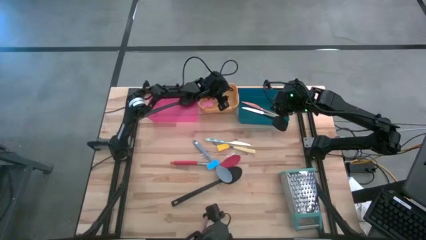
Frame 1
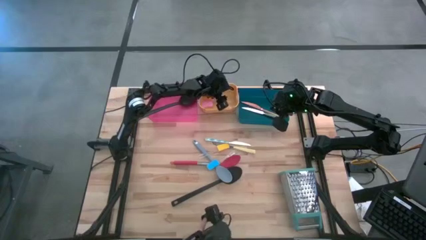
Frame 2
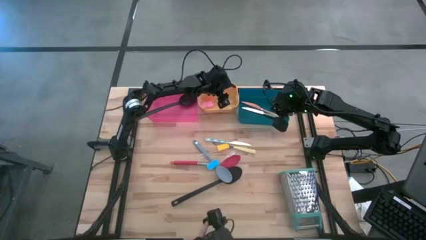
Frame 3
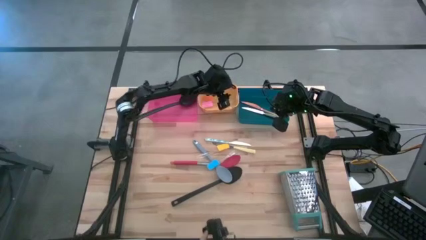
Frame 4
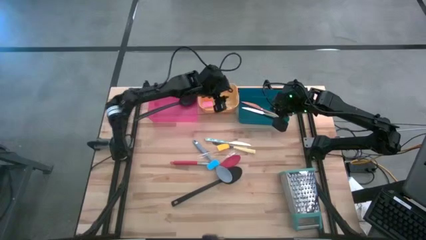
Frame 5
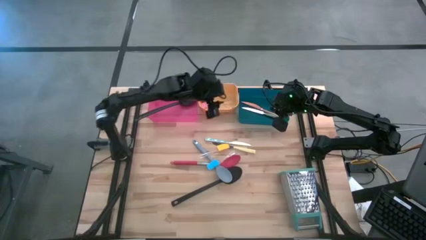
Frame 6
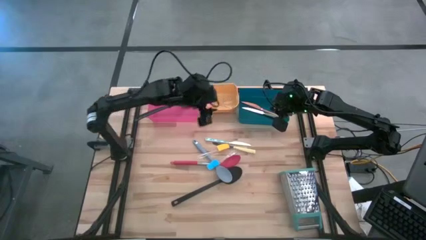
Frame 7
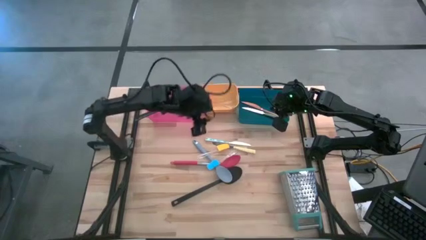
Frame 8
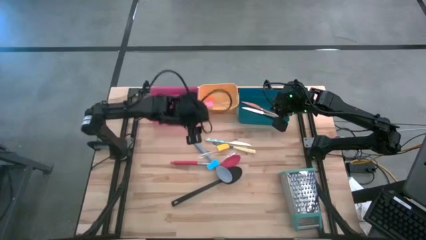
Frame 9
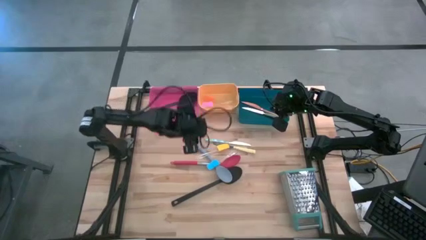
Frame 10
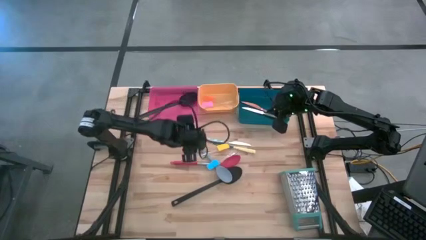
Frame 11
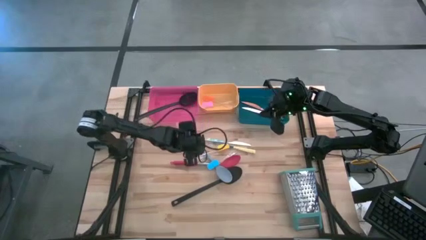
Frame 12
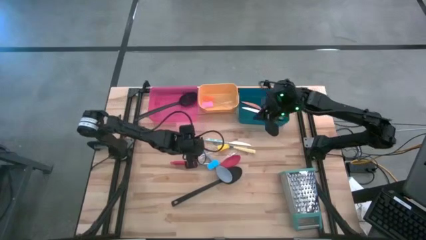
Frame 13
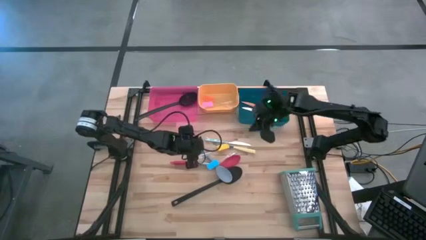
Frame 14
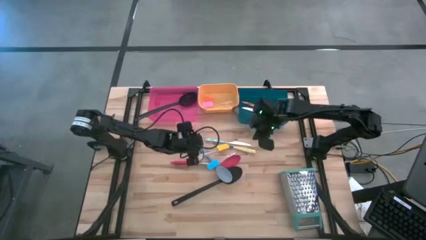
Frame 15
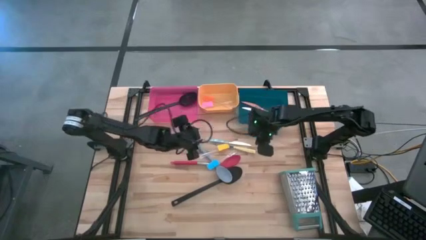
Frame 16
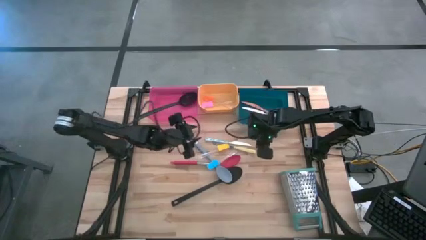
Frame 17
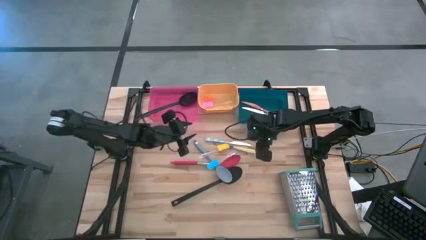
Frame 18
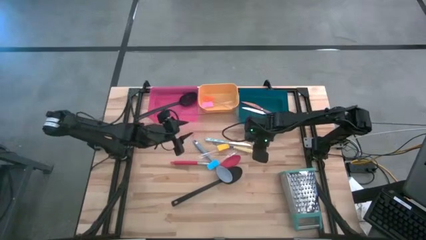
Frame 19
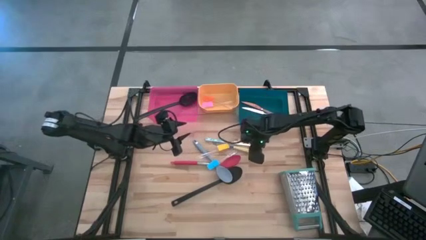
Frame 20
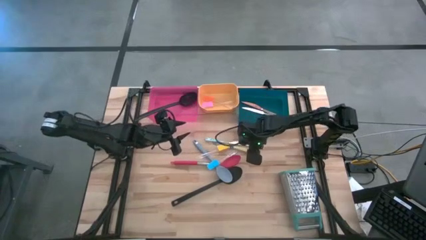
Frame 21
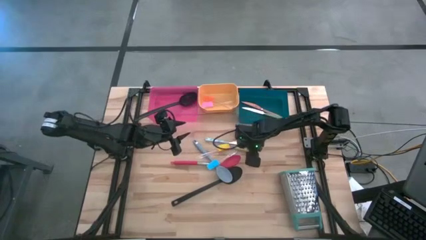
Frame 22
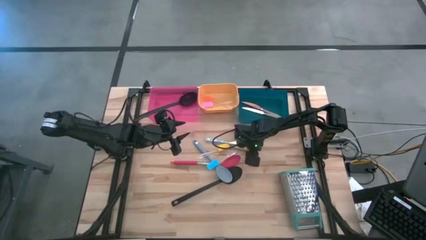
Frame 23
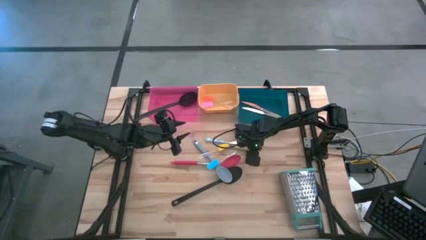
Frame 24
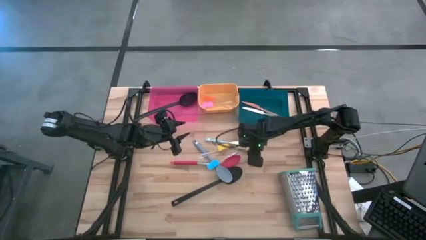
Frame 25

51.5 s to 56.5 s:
Task: Pick & Place Kitchen Items
Put the white knife into the blue bin

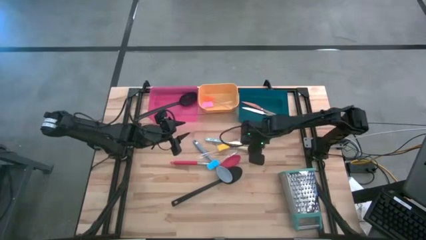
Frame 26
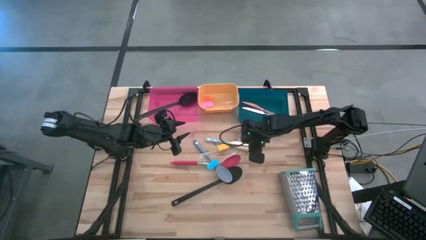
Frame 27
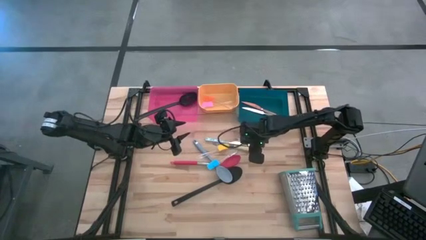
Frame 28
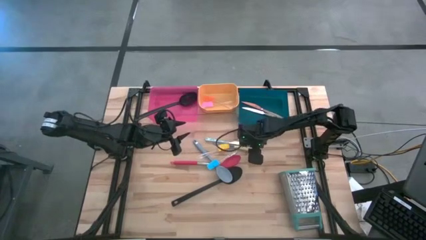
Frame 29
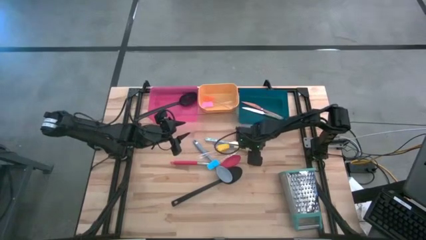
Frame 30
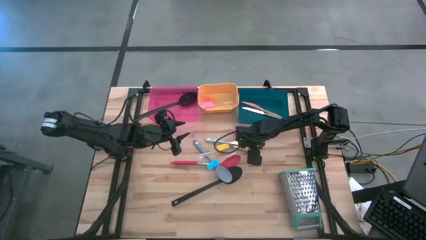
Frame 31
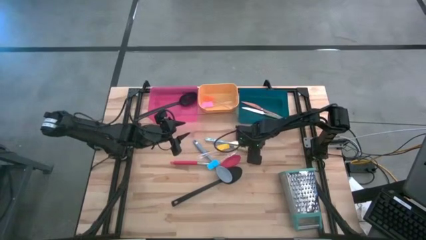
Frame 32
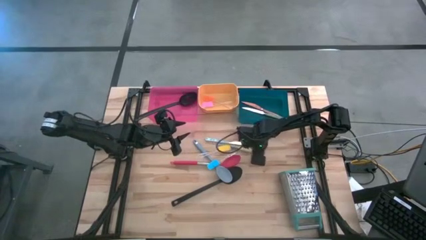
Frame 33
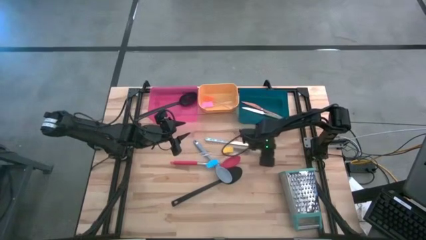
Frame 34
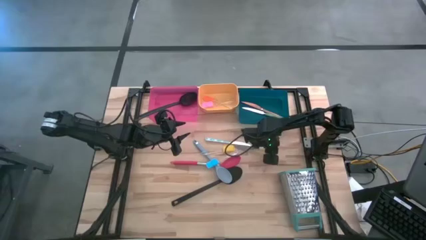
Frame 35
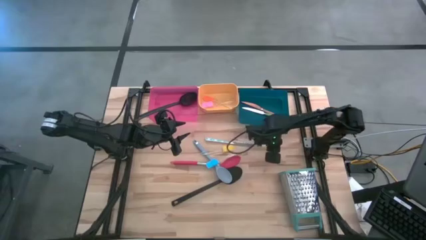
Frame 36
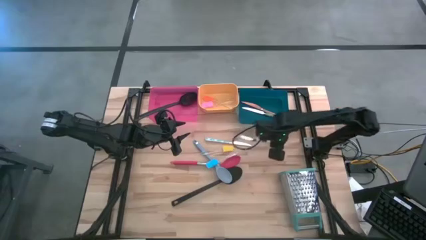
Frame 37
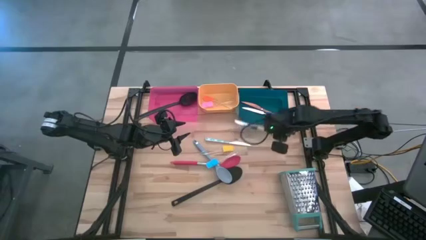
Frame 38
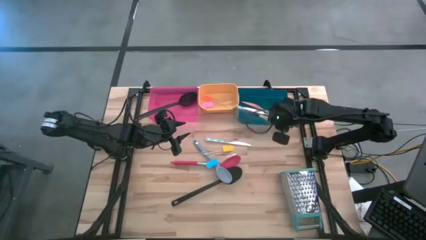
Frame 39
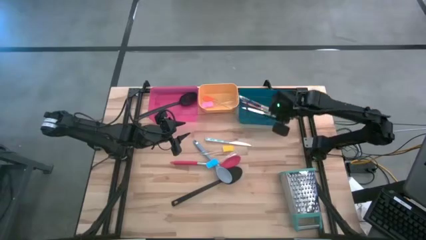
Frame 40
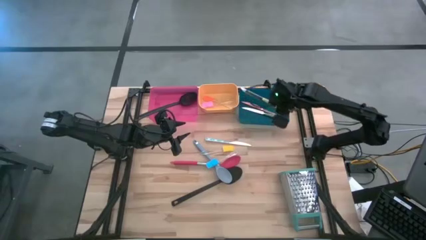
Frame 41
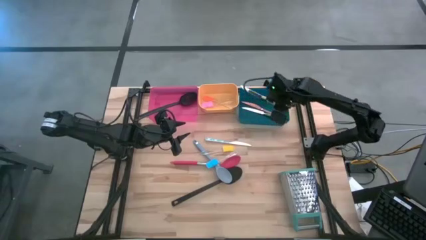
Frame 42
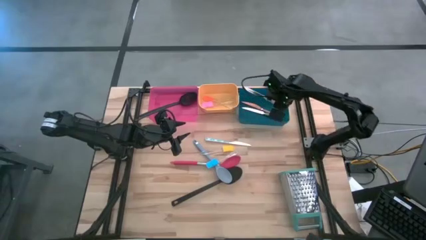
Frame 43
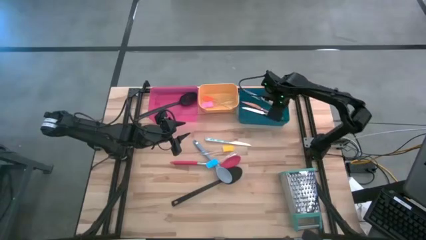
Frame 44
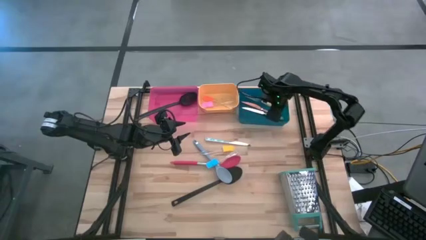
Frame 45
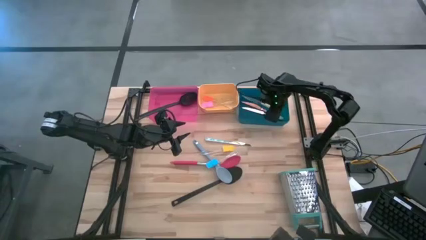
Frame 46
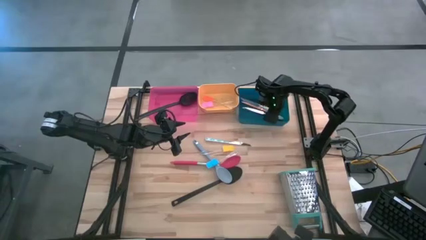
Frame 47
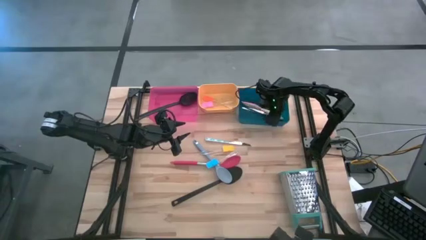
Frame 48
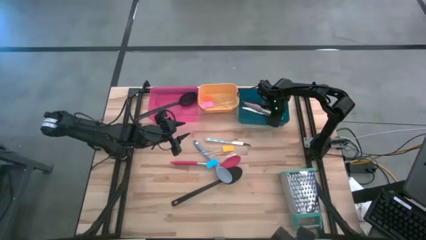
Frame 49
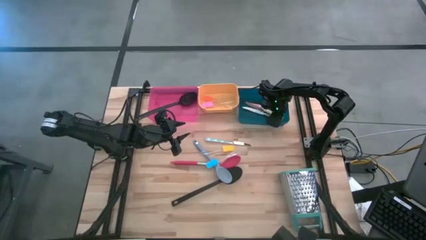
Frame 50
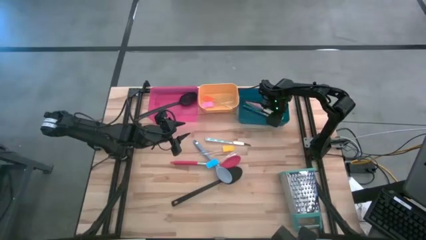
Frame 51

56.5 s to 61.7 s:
Put the yellow knife into the blue bin

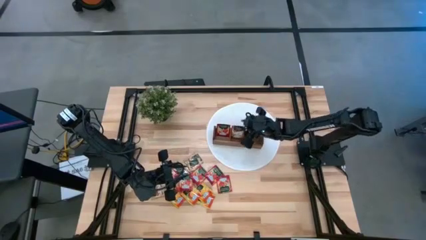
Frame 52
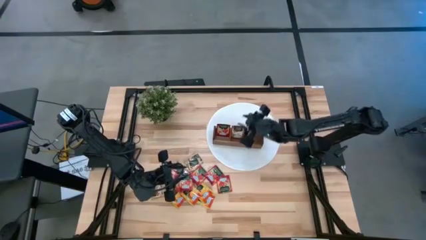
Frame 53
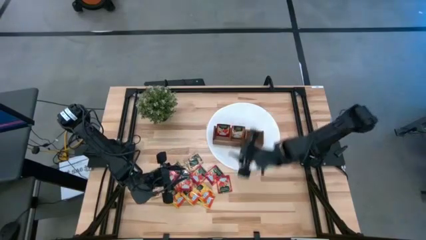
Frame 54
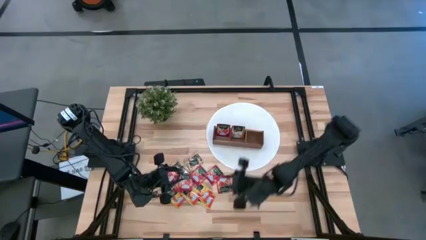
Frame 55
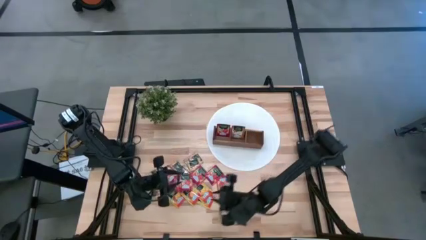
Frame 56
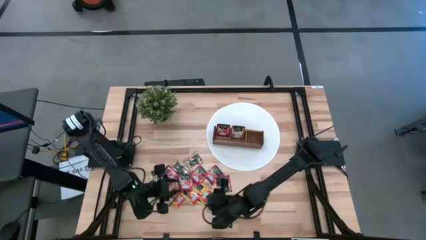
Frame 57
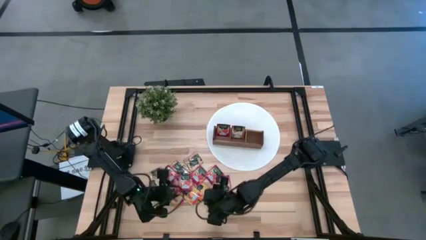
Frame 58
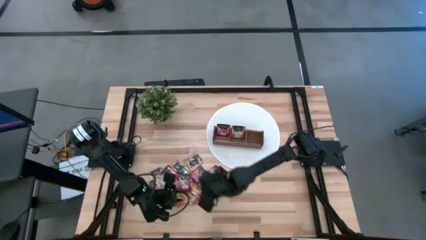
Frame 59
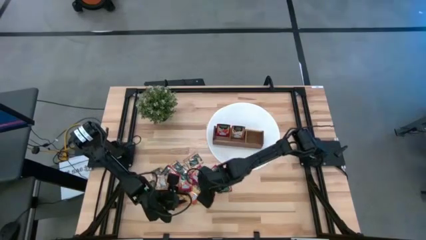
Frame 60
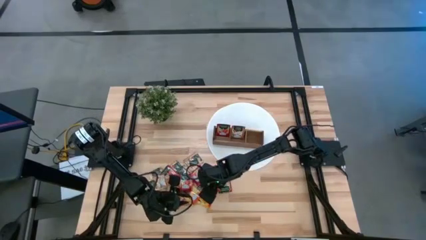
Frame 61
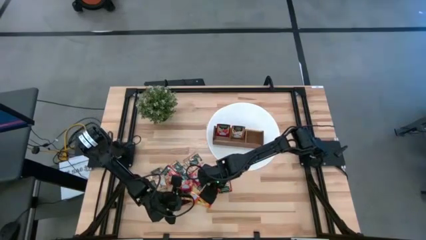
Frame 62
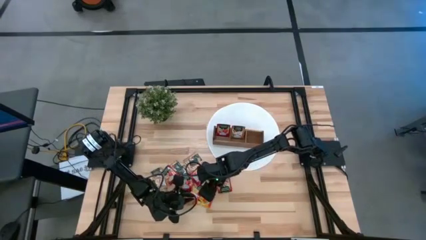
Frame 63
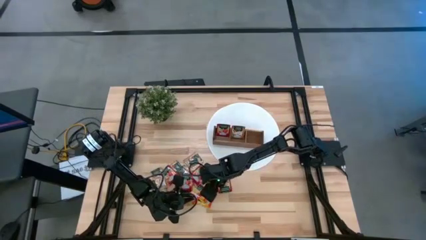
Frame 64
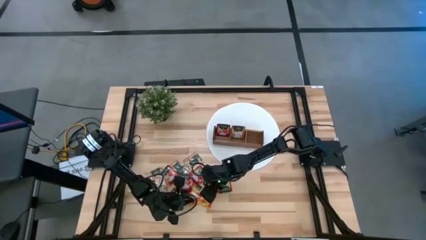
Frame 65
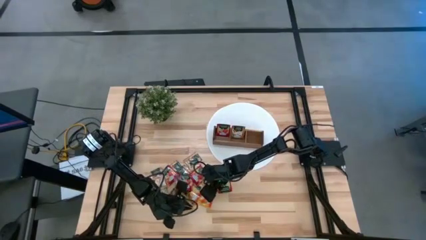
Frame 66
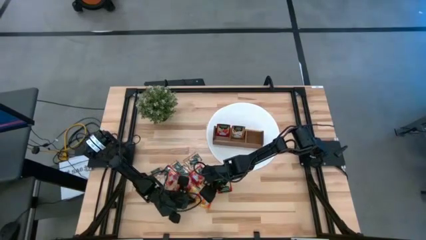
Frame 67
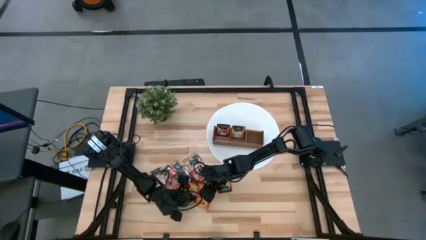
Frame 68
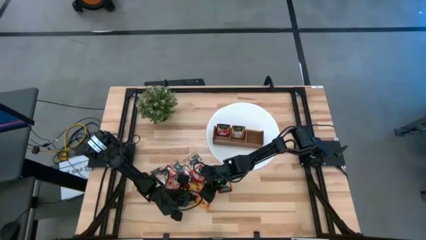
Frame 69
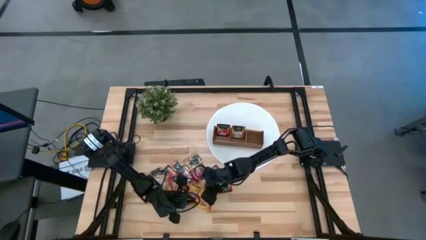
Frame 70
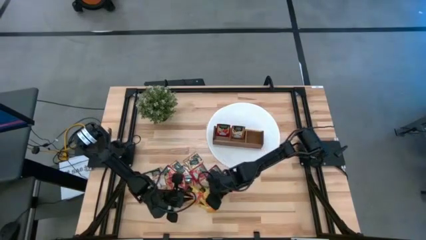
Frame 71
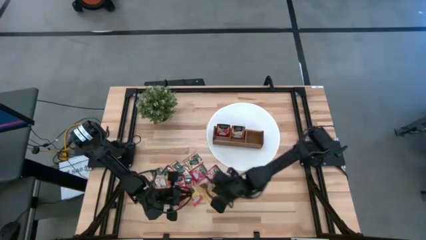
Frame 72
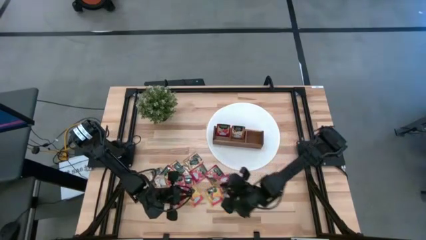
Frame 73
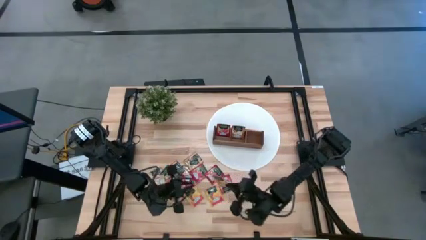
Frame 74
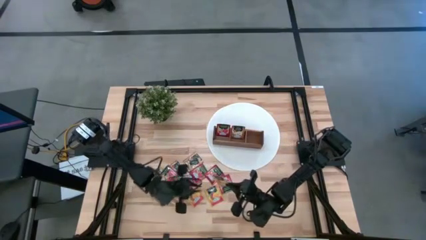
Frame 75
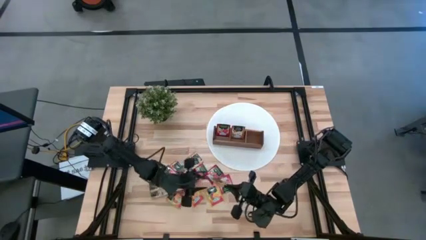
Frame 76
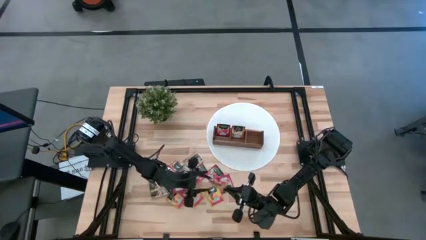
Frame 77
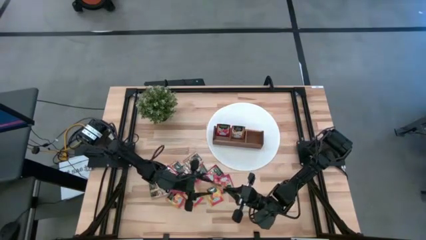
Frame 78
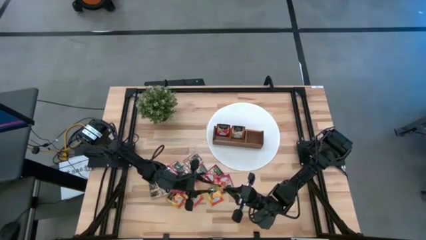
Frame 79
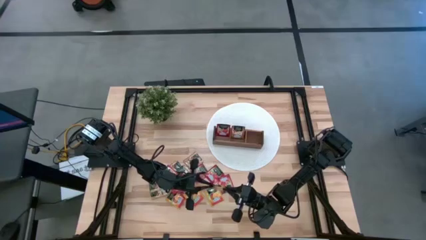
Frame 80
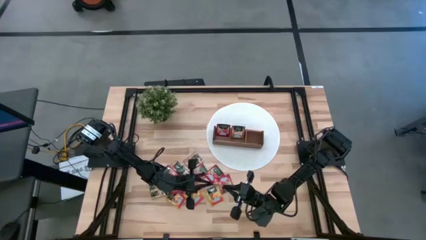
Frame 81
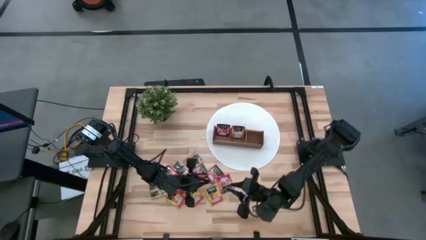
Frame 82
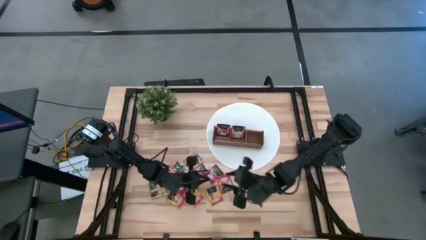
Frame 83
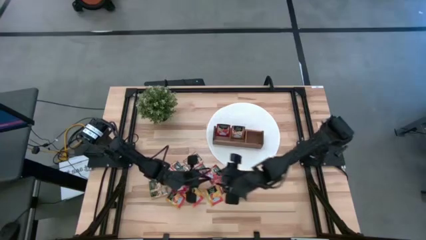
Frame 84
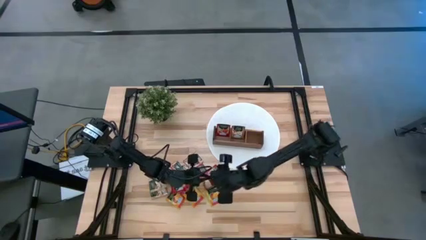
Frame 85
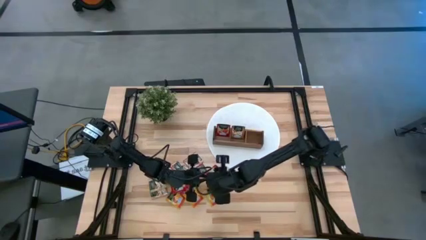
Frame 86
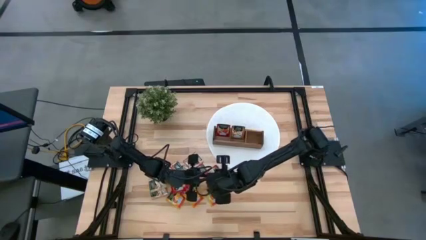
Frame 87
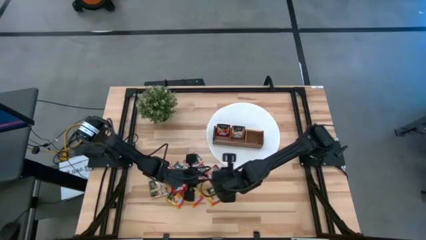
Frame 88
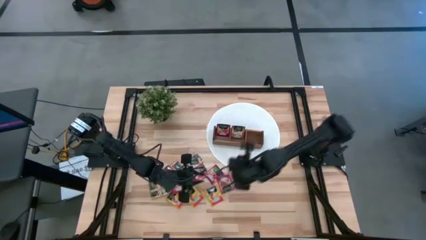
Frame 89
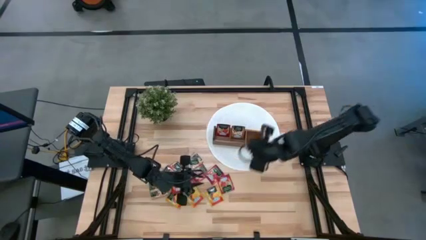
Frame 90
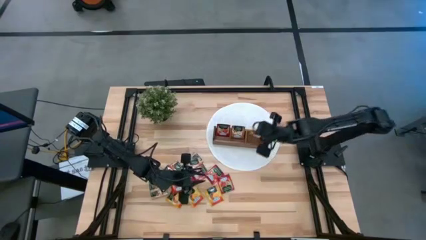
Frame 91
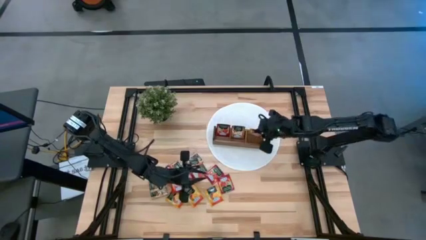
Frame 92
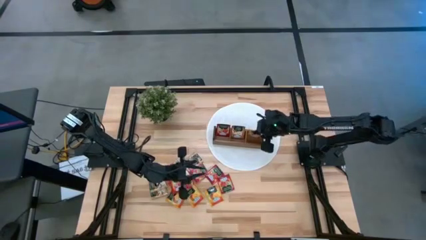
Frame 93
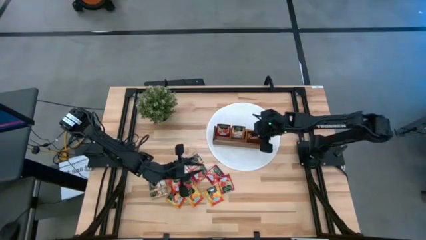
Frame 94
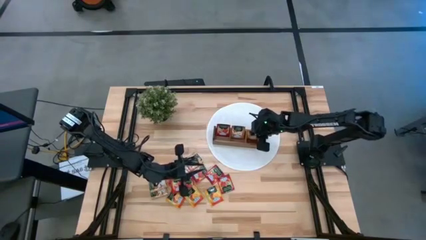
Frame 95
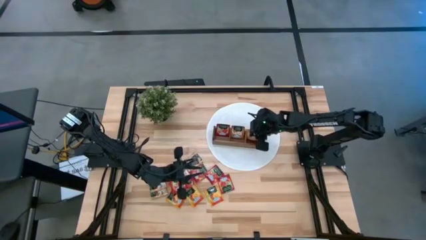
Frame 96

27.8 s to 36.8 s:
Task: Pick & Place Tea
Put the yellow tea bag into the right section of the wooden organizer
